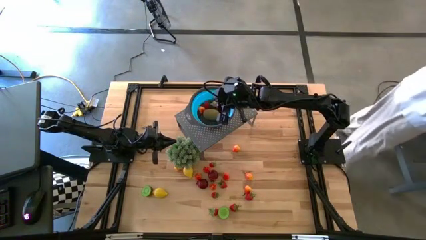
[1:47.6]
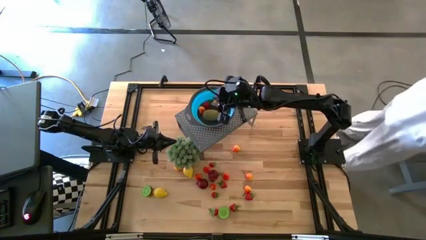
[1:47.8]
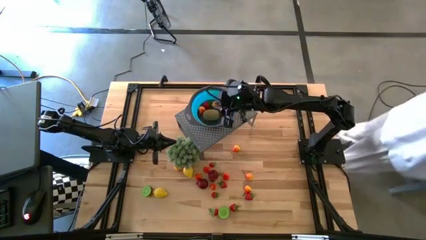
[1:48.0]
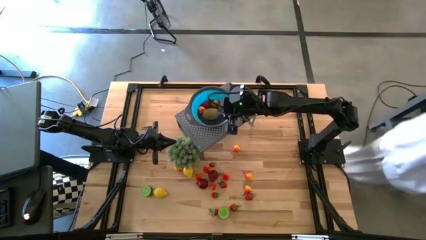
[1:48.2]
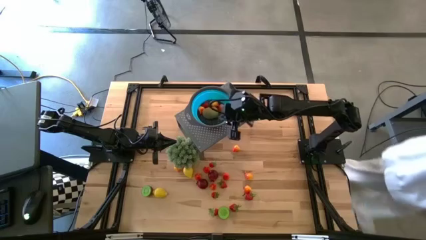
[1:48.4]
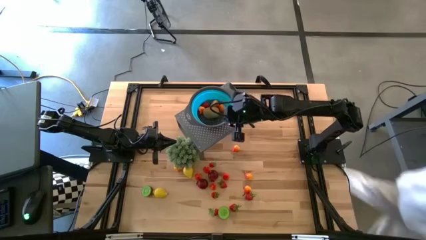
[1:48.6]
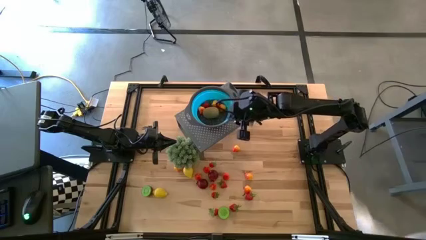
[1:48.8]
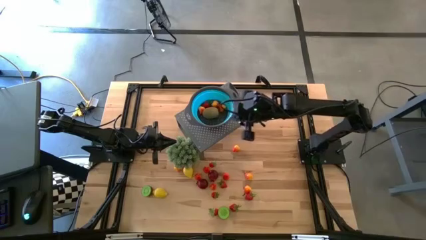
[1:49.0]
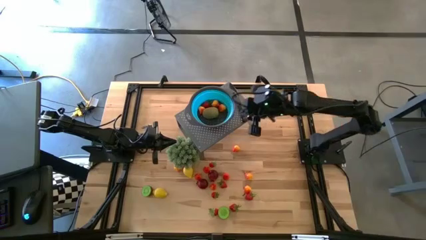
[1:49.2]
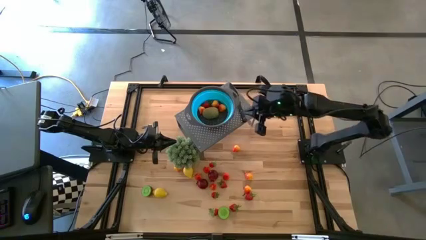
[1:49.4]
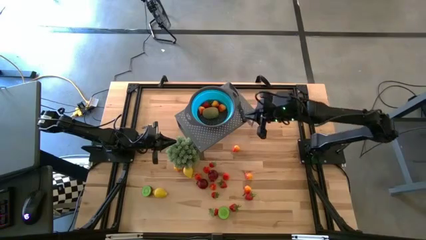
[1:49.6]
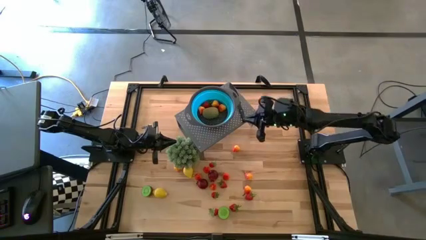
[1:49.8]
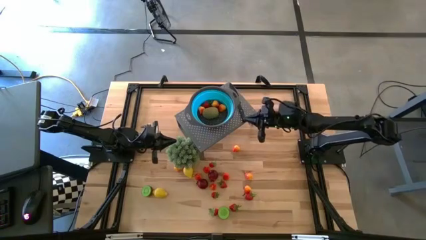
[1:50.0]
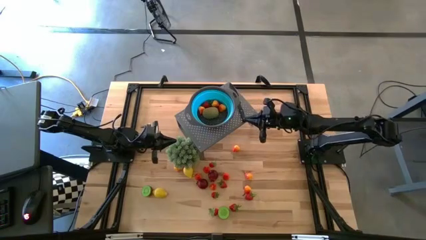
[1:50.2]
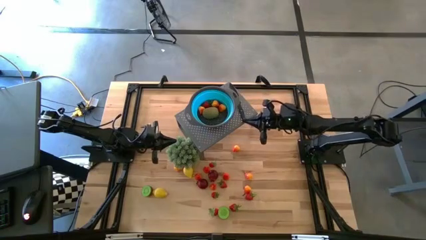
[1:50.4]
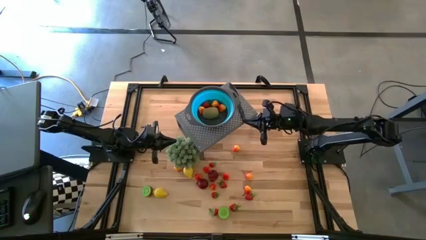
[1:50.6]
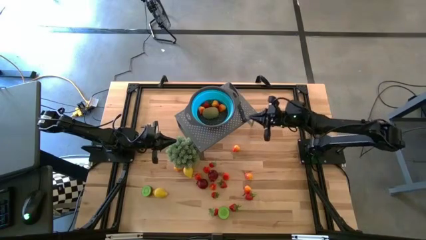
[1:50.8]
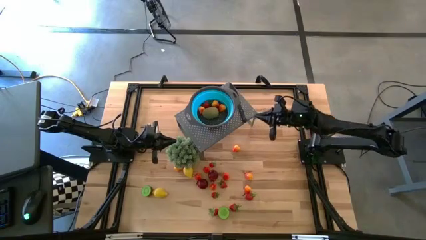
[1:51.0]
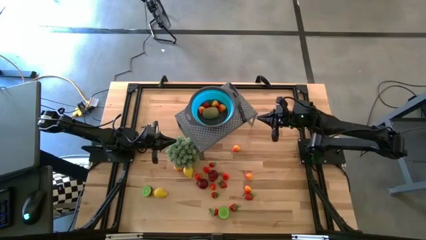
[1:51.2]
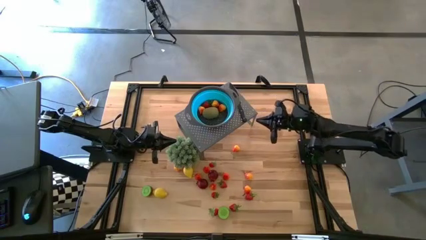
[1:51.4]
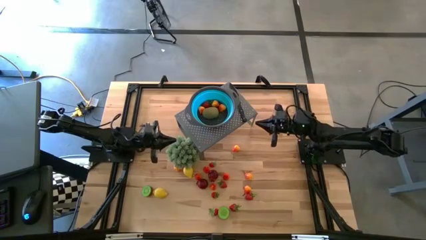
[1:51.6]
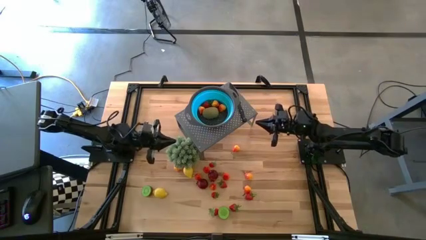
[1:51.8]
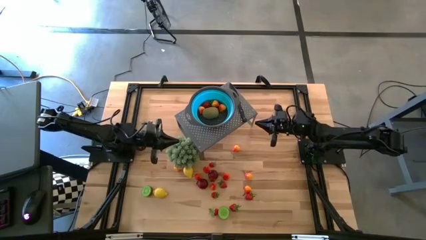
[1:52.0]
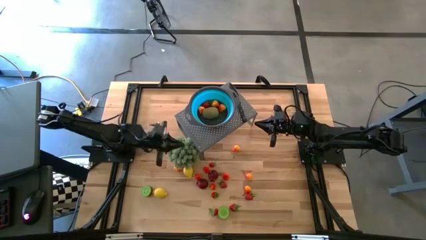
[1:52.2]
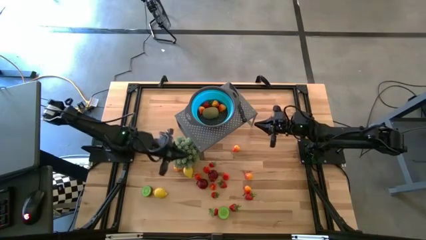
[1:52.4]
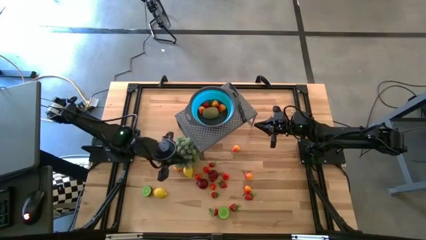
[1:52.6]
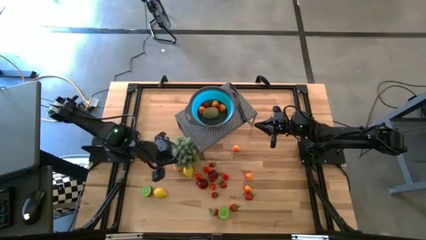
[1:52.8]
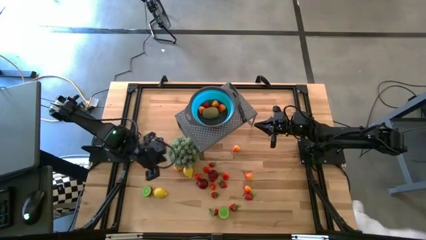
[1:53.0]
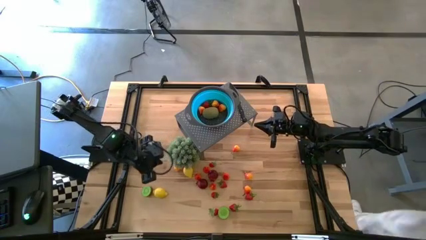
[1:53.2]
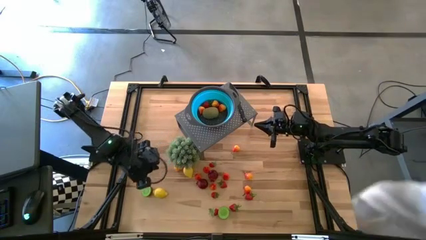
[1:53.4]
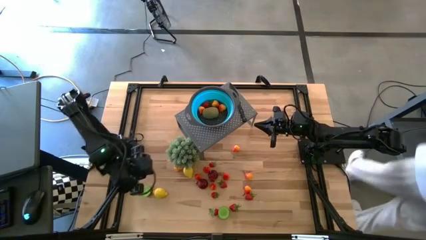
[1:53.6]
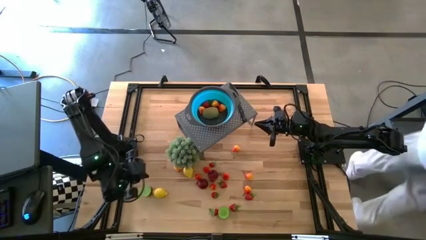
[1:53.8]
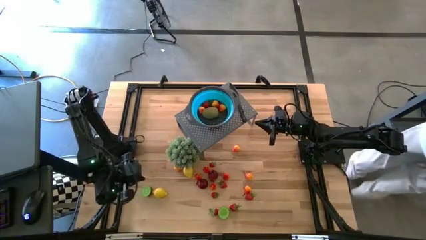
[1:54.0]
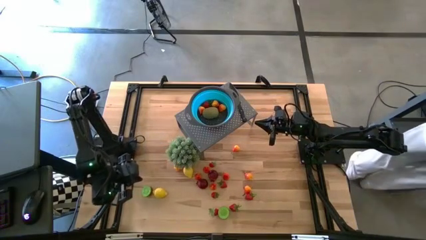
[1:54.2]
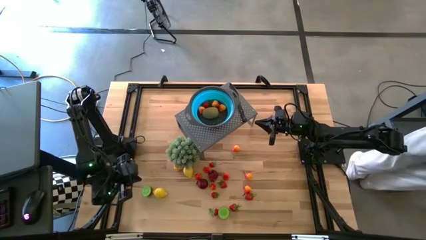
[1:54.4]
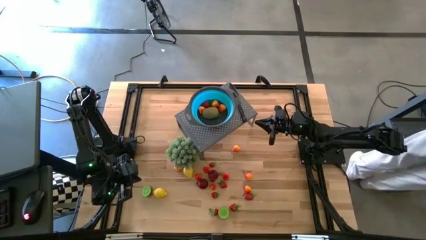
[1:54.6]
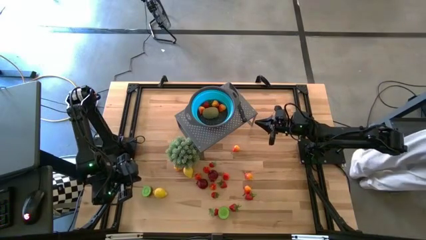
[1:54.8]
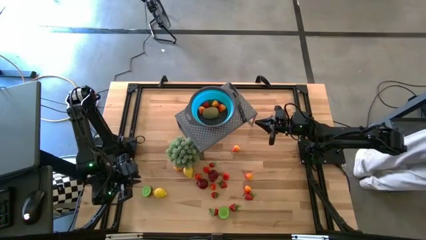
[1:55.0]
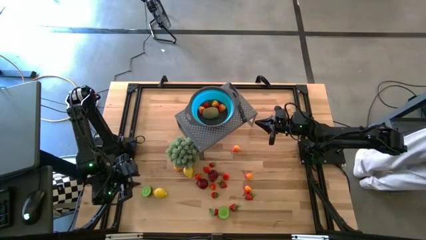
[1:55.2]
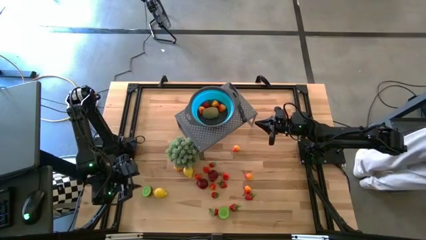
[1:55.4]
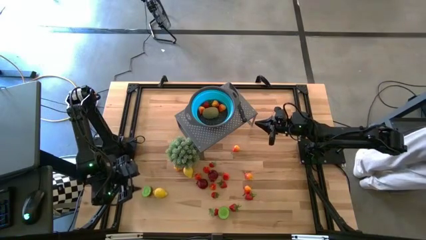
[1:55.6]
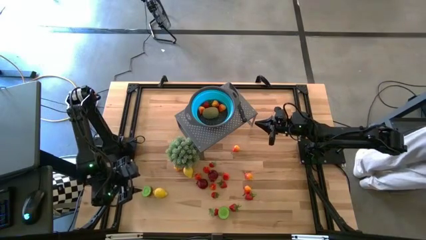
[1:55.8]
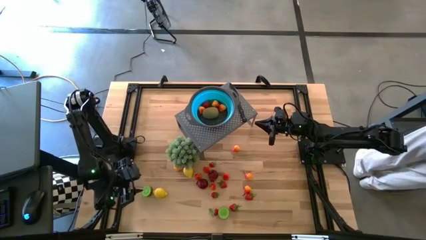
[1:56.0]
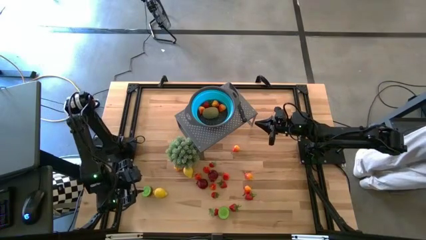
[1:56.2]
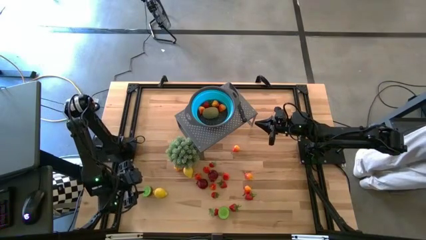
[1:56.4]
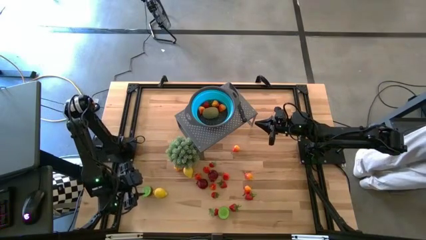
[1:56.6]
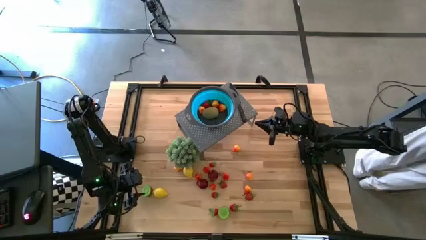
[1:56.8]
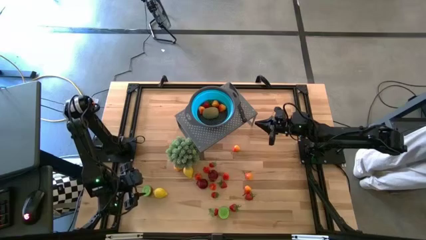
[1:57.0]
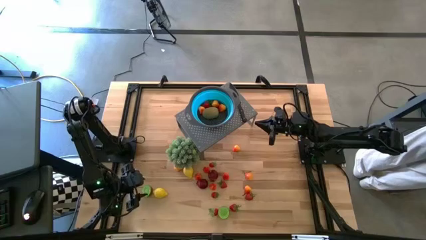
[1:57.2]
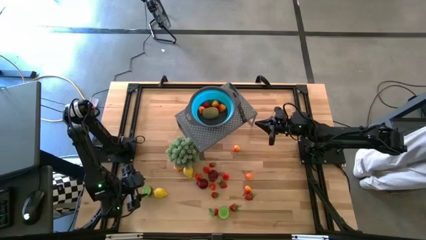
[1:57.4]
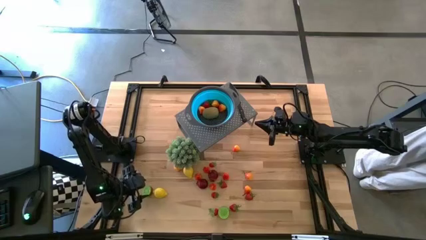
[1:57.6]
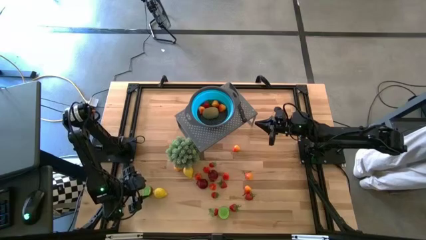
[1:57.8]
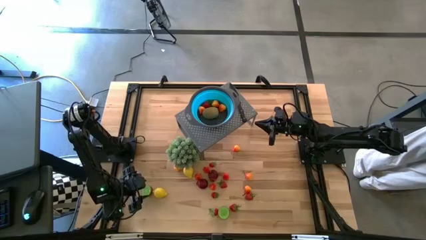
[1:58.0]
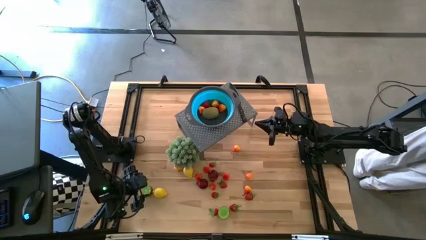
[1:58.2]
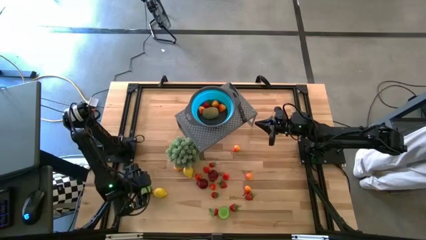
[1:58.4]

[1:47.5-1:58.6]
Task: Pick & Place Fruit
Put the kiwi into the blue strainer bowl on the shelf
